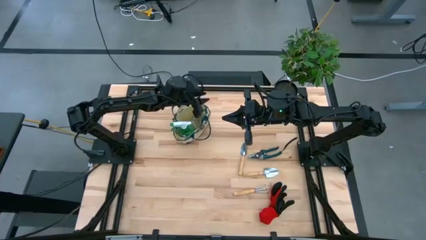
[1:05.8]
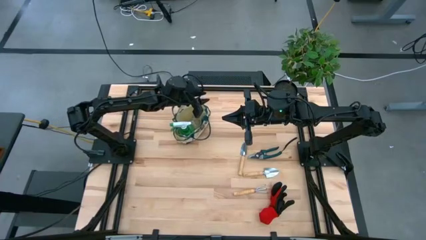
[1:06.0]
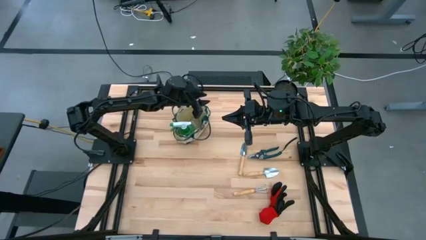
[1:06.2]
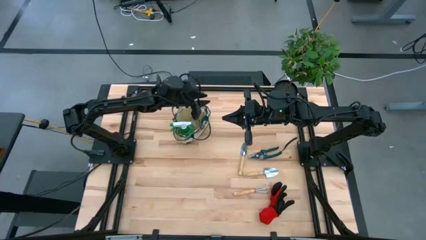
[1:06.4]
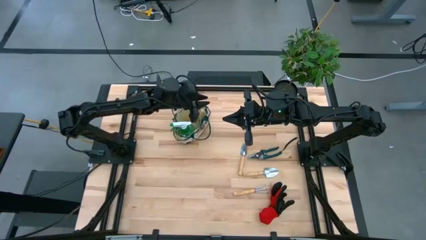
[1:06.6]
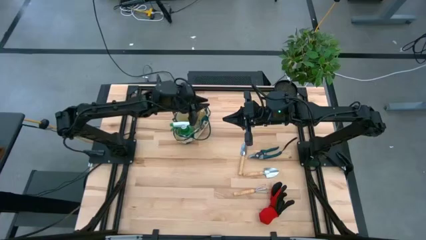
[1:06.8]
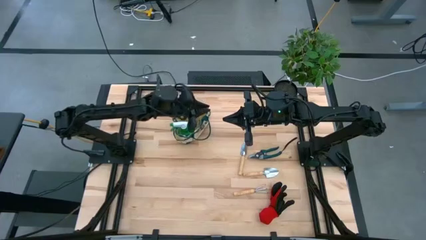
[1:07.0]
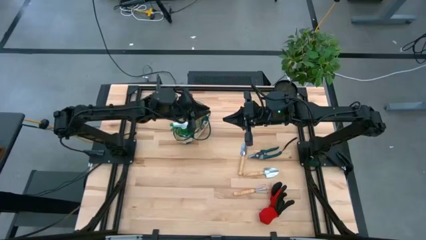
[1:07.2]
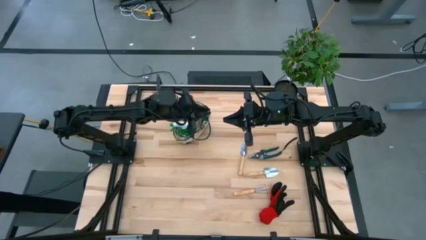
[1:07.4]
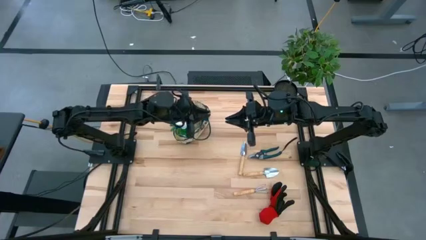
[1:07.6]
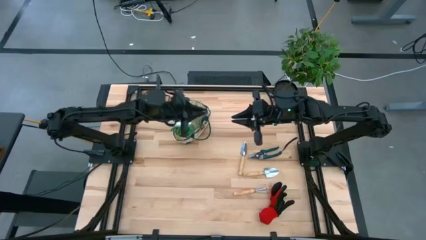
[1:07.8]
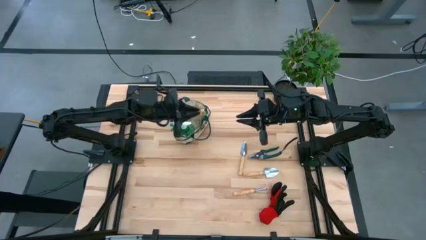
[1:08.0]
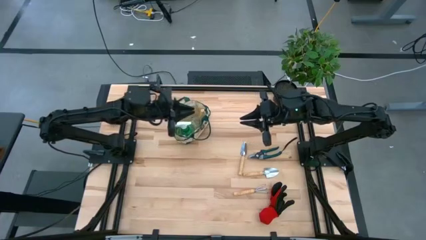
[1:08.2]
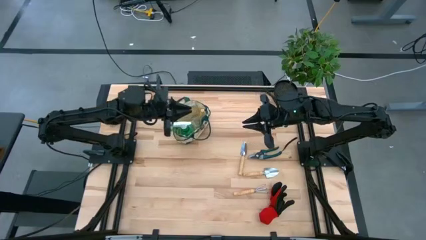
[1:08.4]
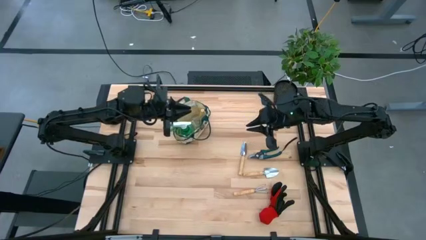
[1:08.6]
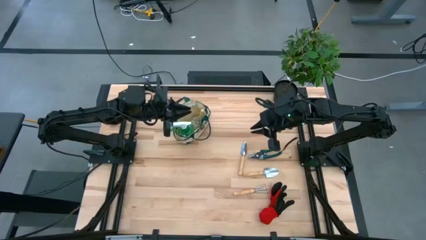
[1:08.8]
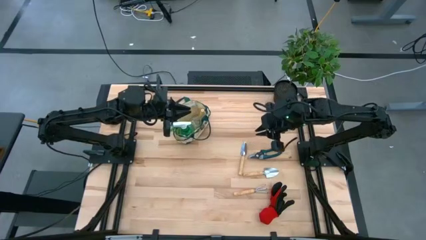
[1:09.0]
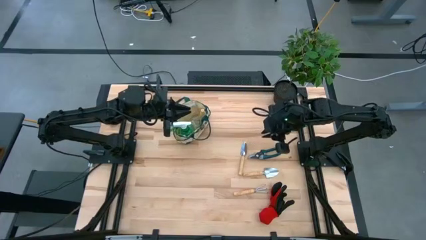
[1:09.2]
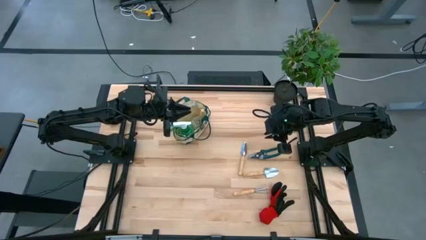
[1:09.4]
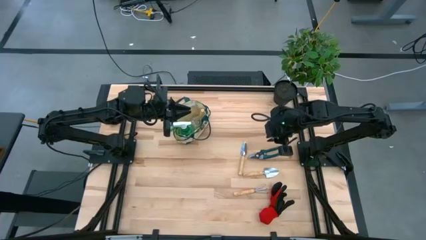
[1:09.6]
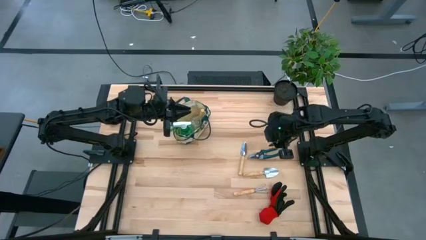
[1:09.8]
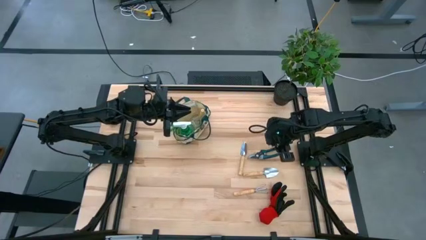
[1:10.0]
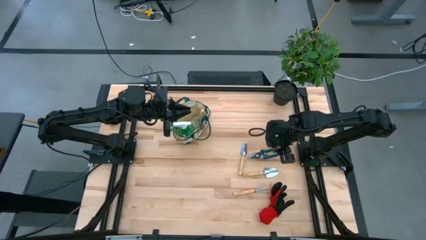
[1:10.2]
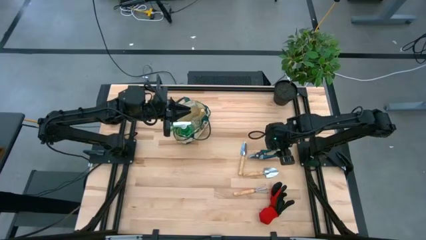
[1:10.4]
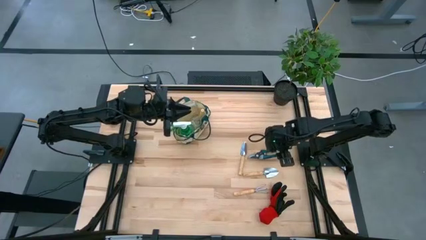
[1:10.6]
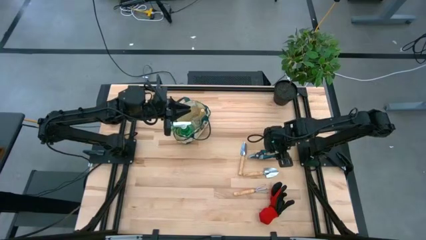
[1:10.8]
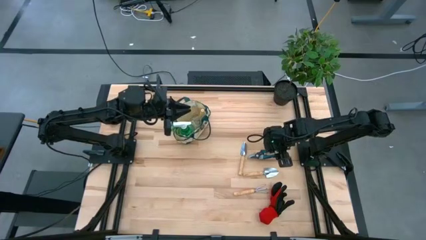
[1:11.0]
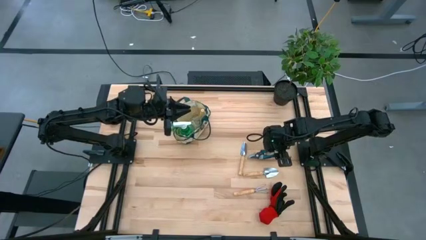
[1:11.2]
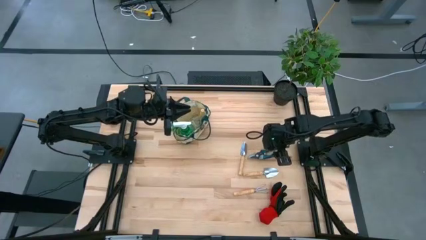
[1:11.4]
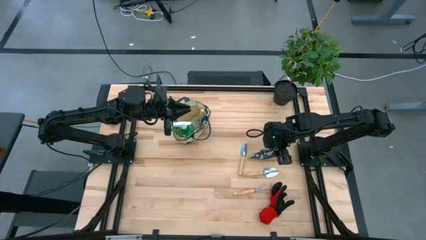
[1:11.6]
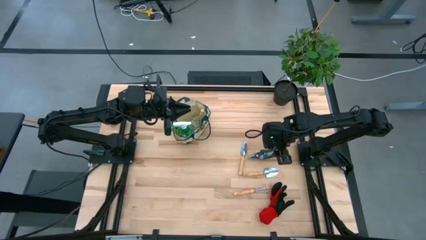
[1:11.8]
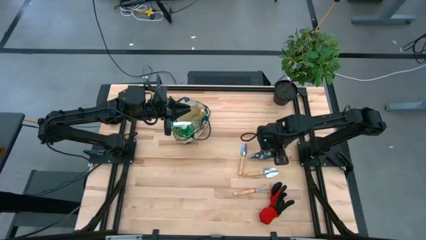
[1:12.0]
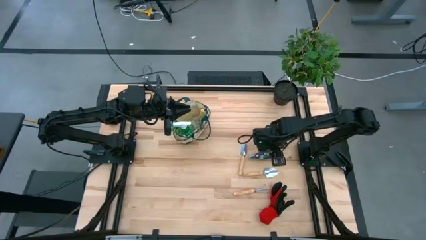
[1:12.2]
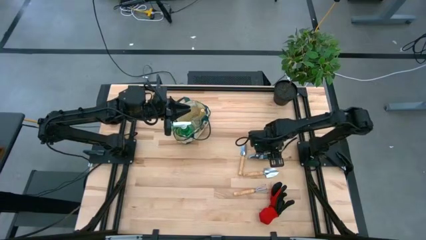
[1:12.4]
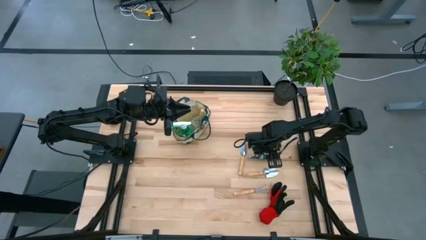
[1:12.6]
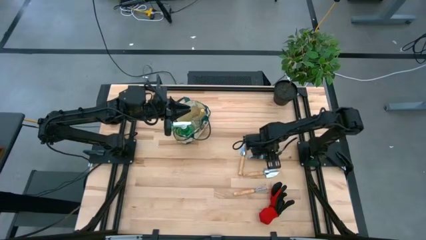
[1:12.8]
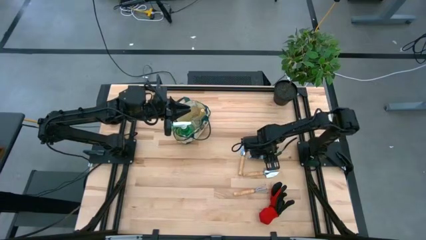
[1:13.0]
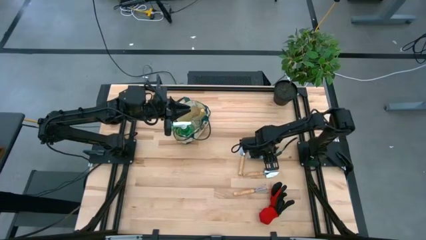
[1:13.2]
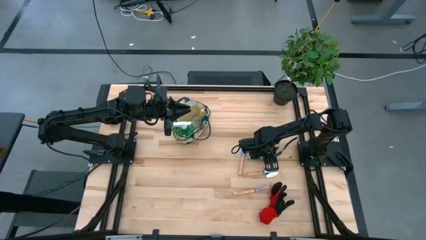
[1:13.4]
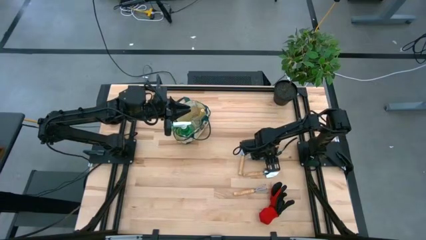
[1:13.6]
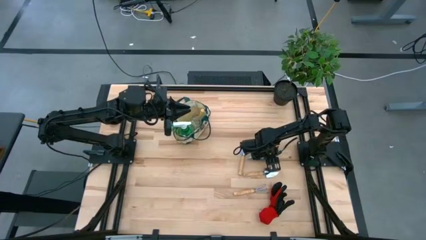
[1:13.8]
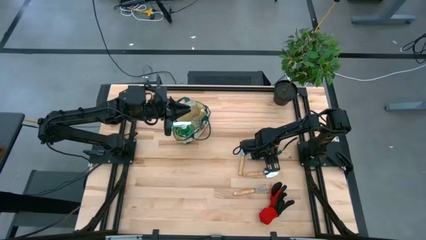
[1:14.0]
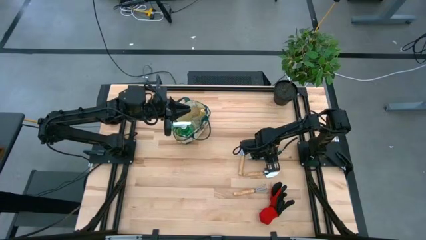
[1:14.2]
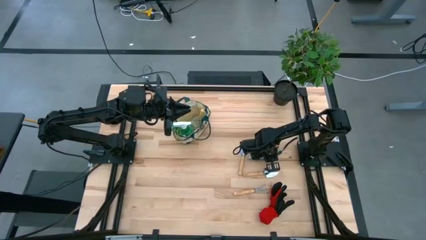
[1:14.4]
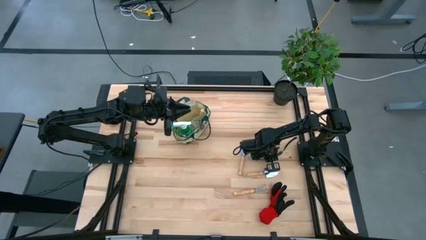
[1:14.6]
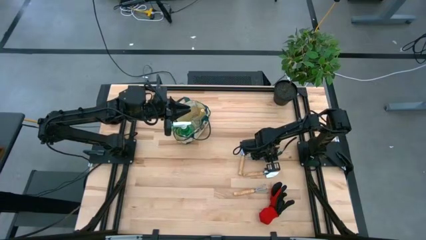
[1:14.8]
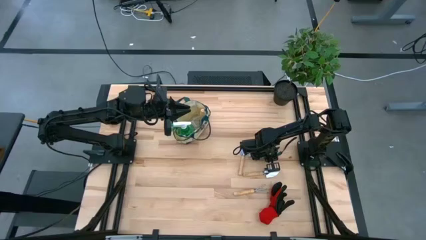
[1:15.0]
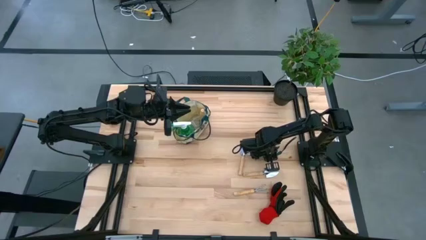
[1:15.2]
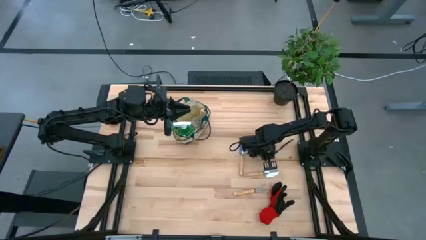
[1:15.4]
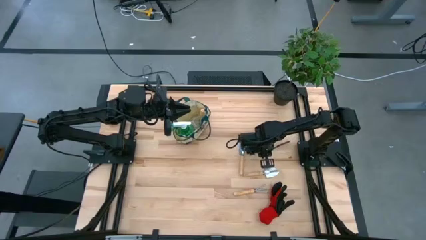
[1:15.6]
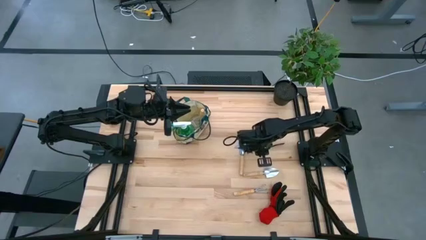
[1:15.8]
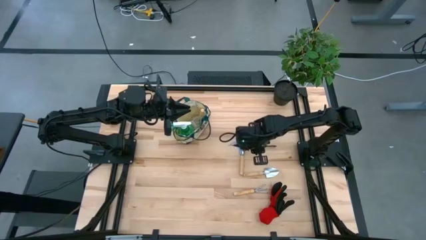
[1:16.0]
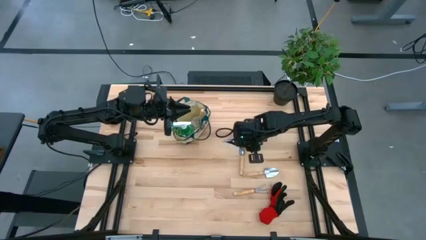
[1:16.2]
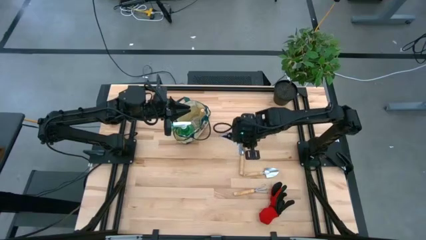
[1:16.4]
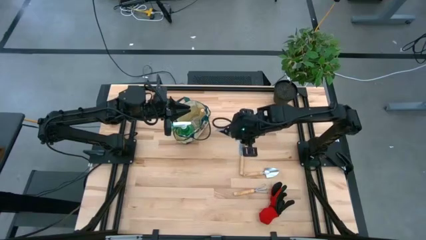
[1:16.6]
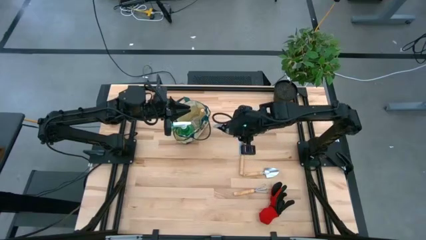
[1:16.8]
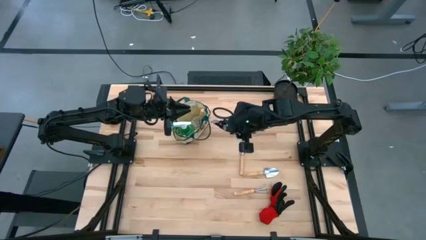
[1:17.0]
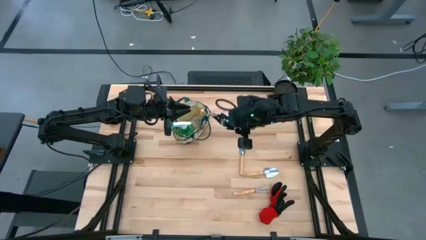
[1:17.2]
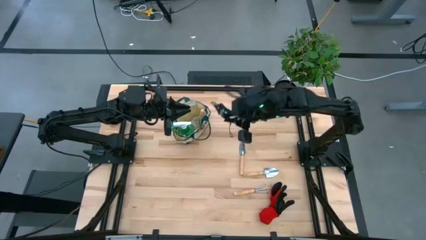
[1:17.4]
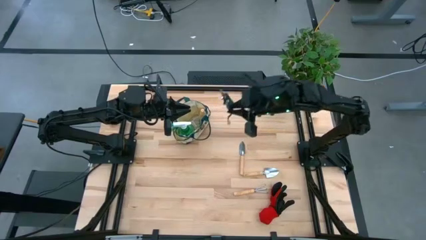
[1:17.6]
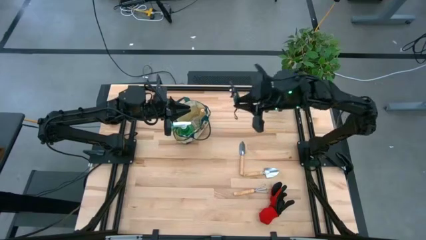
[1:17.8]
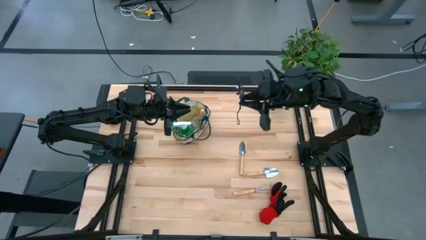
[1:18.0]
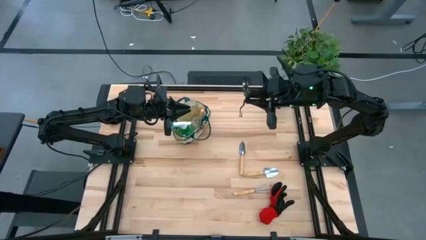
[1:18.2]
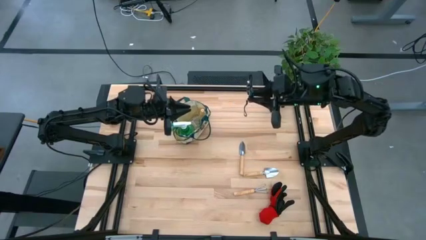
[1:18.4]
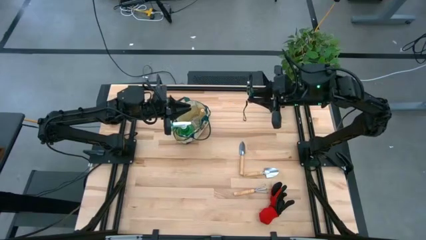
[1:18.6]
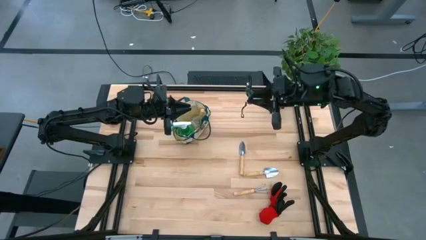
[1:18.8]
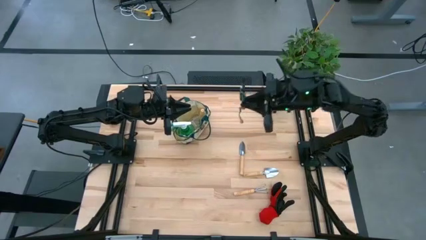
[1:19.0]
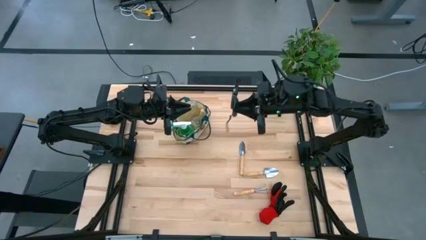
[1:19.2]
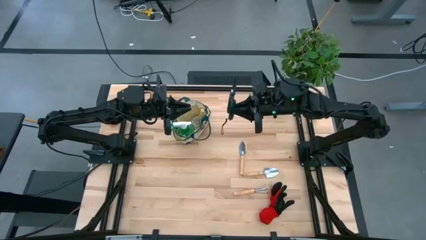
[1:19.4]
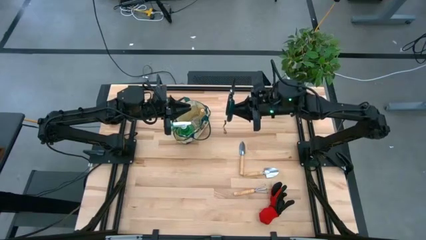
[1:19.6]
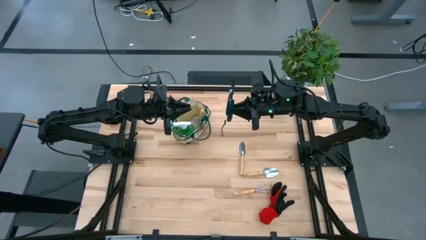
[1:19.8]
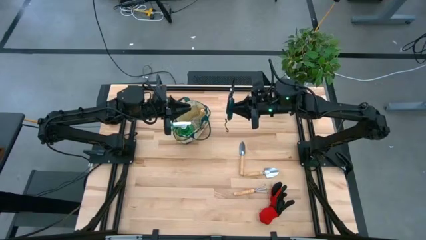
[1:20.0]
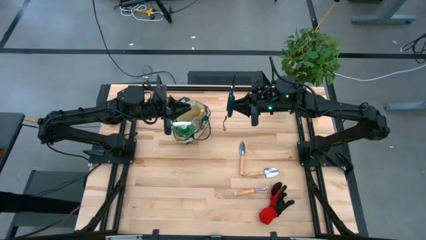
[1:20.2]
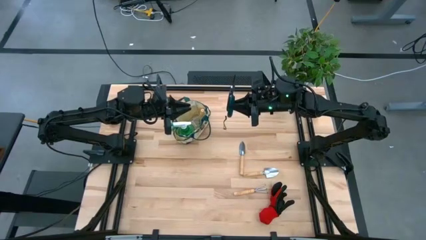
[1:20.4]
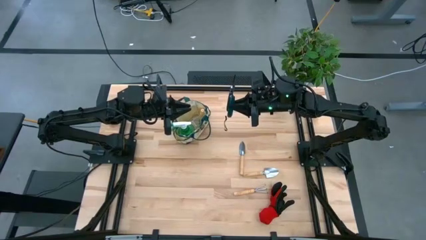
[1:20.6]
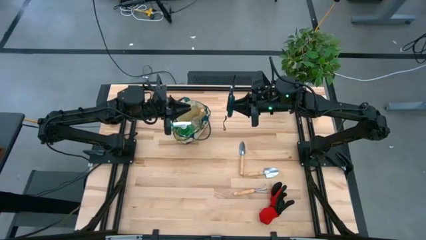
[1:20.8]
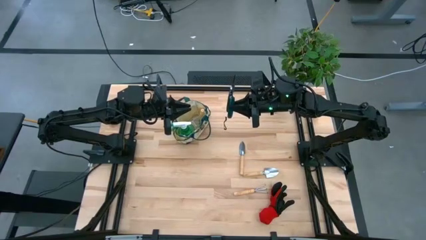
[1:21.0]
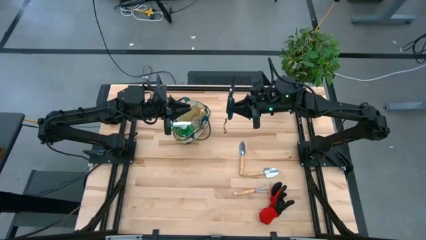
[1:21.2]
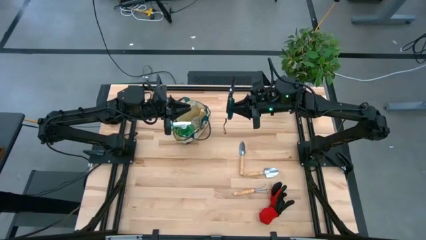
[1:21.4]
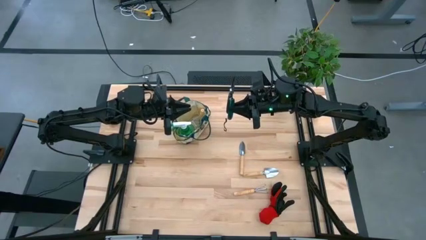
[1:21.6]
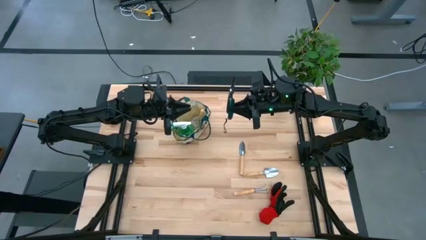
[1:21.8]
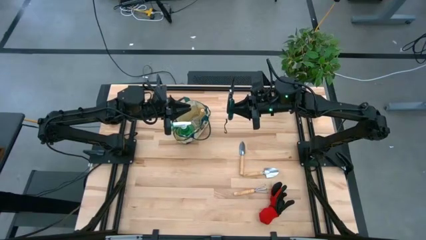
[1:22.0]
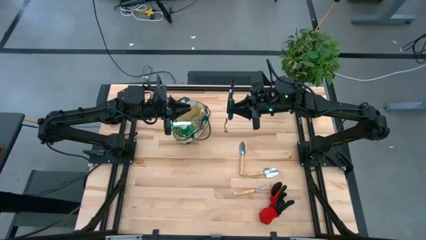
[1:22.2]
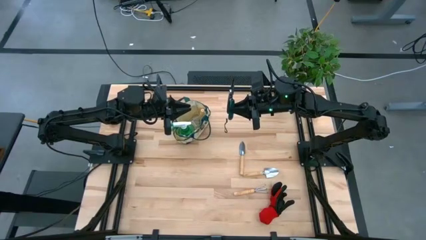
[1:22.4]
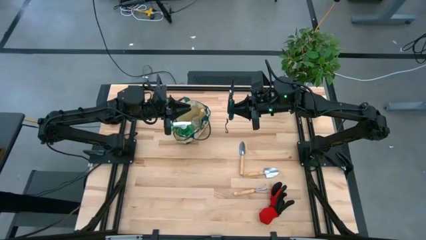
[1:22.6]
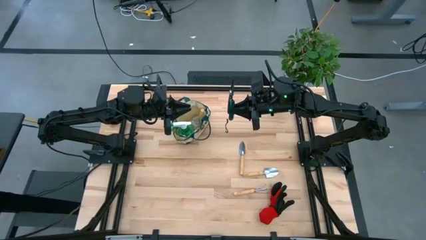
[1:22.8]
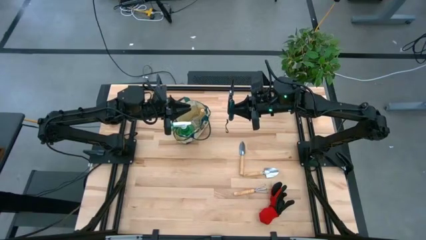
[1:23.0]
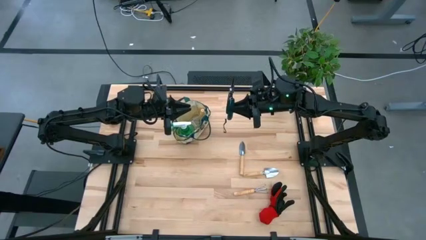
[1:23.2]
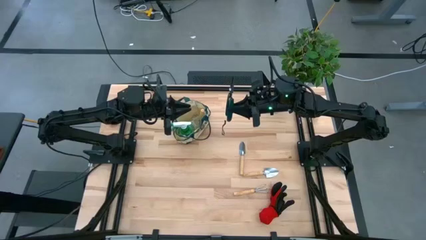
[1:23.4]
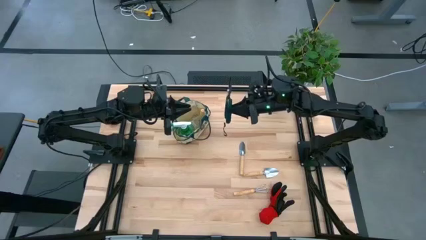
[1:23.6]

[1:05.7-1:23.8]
Task: Pick & Place Garden tools in Gardening bag
Put the green shear scissors into the gardening bag
